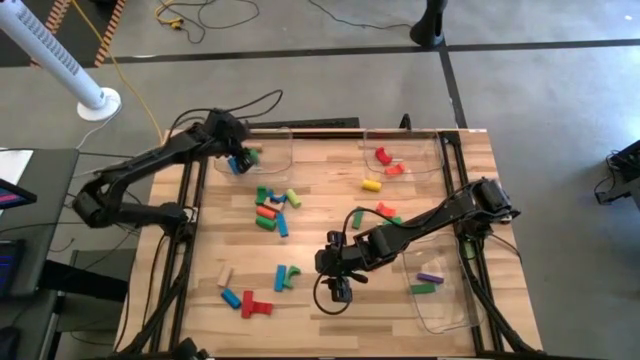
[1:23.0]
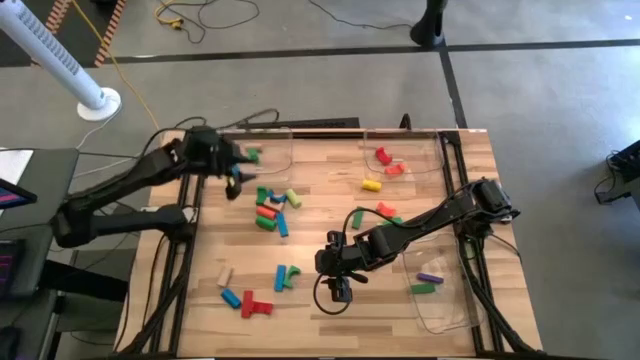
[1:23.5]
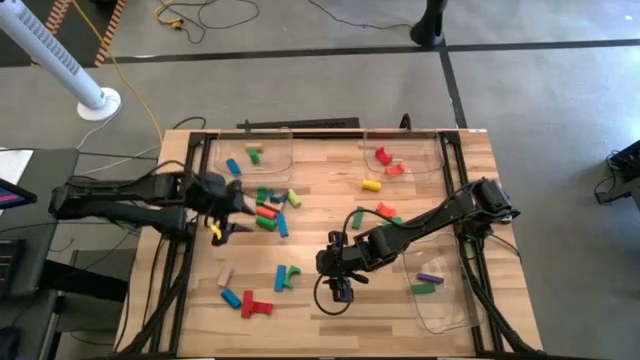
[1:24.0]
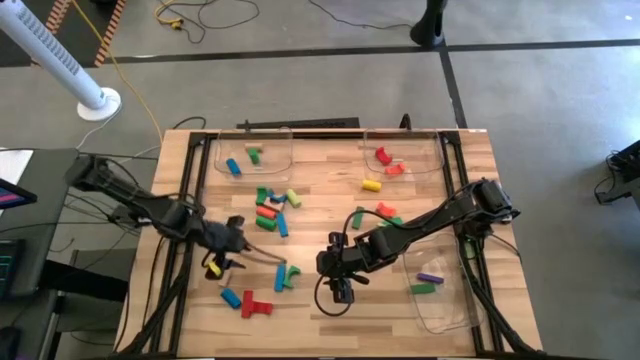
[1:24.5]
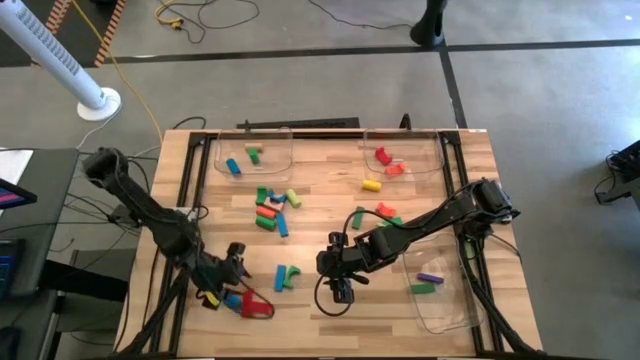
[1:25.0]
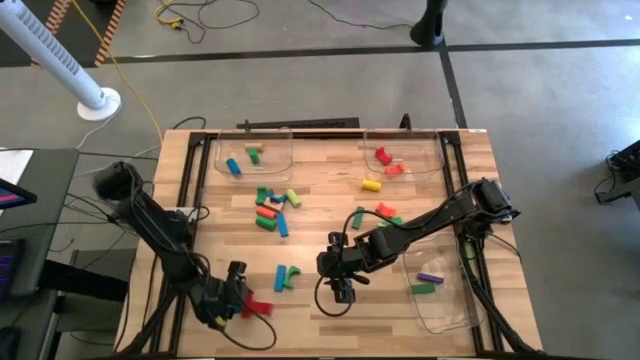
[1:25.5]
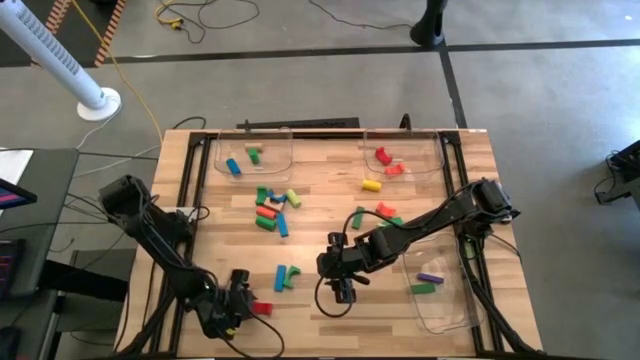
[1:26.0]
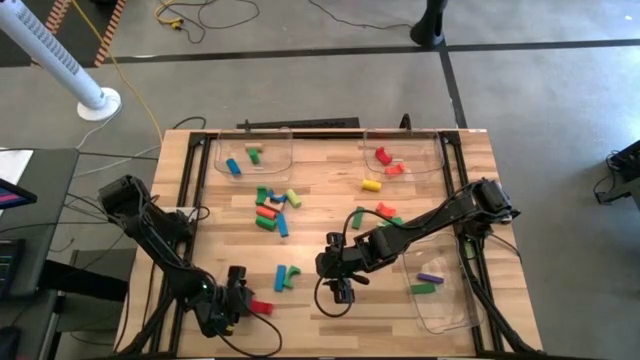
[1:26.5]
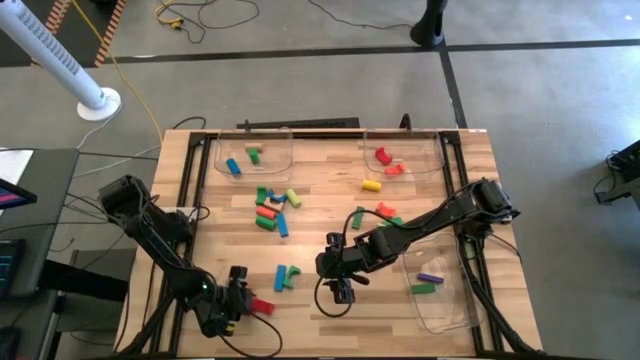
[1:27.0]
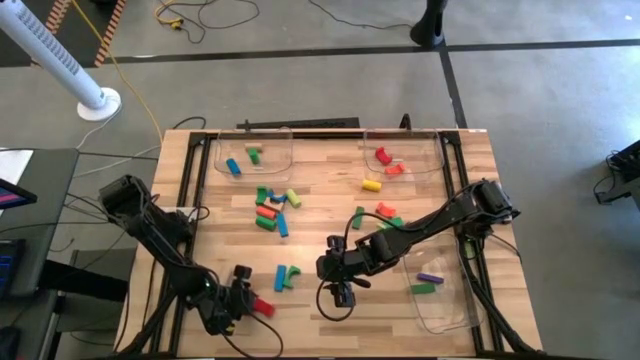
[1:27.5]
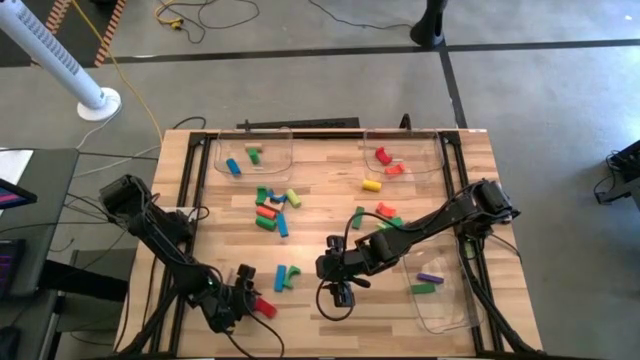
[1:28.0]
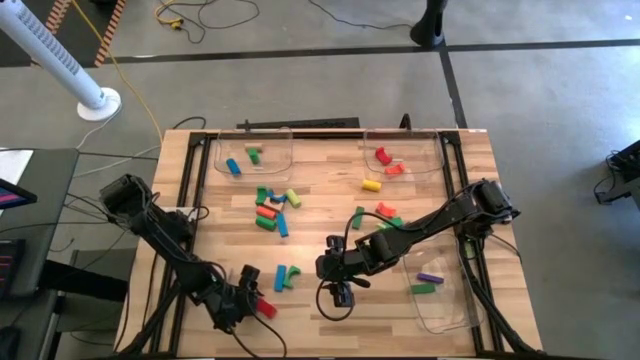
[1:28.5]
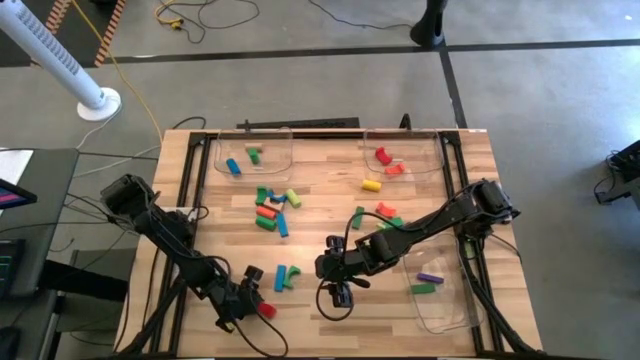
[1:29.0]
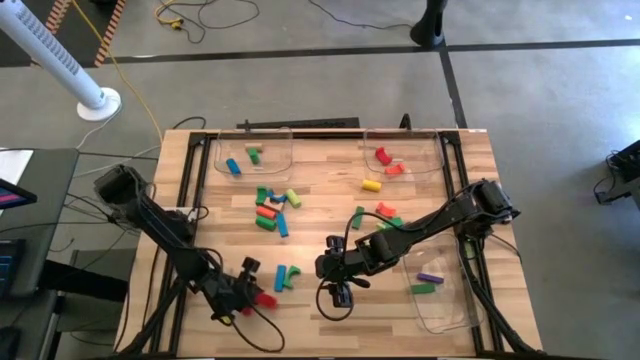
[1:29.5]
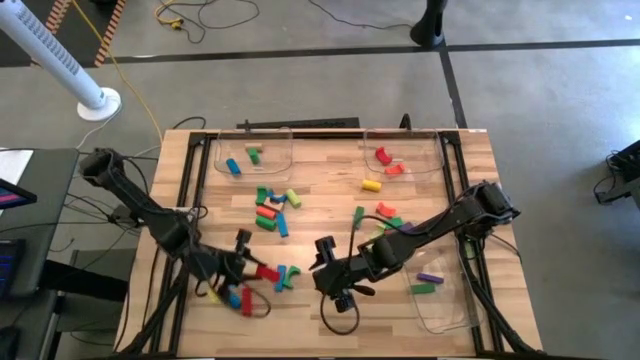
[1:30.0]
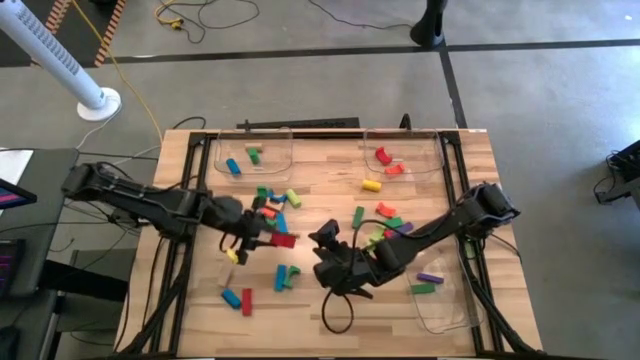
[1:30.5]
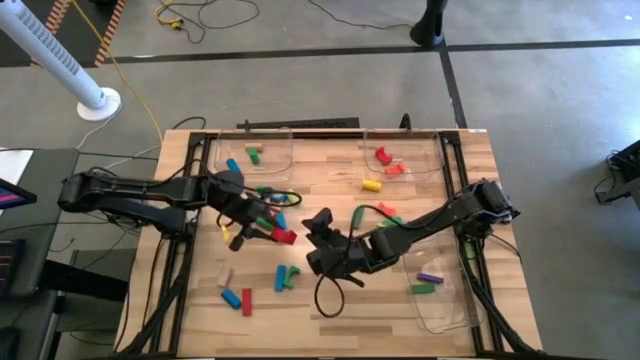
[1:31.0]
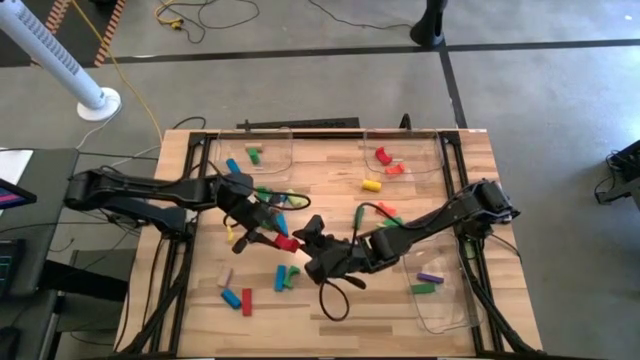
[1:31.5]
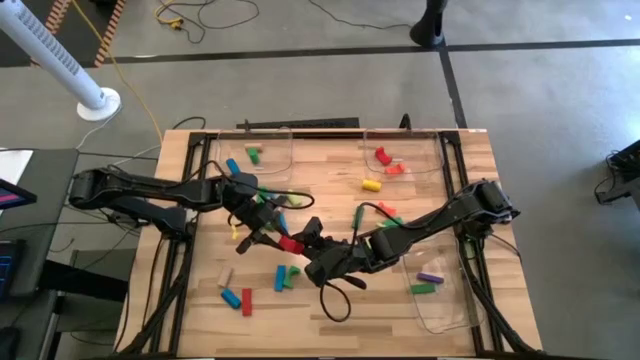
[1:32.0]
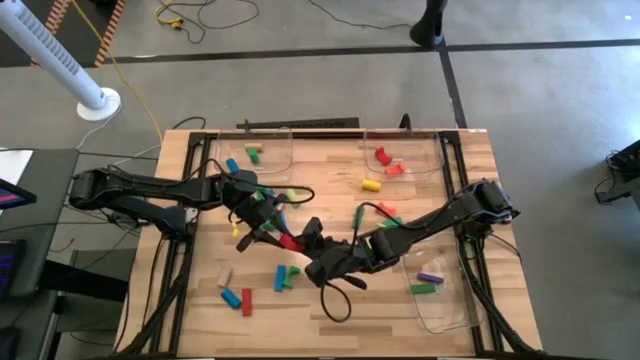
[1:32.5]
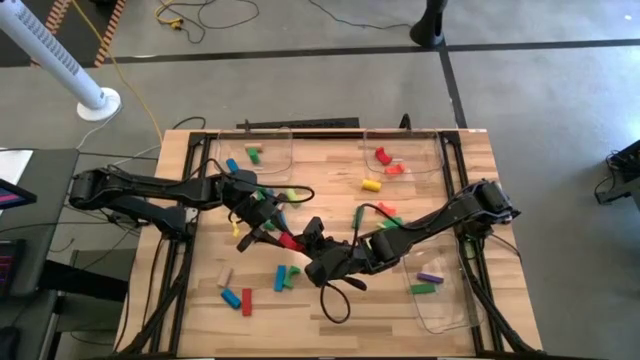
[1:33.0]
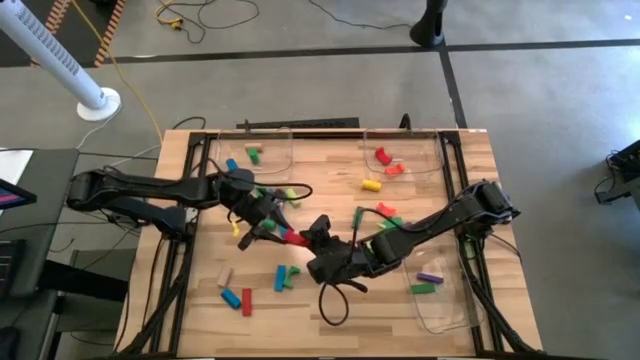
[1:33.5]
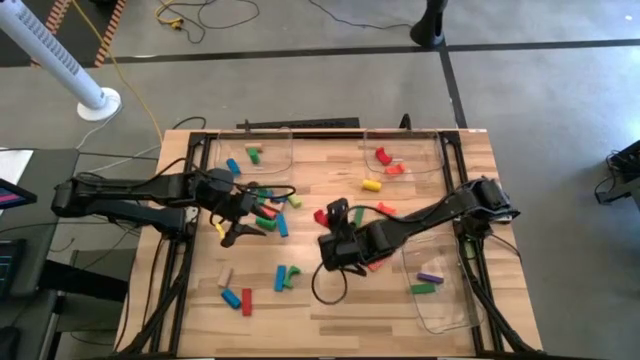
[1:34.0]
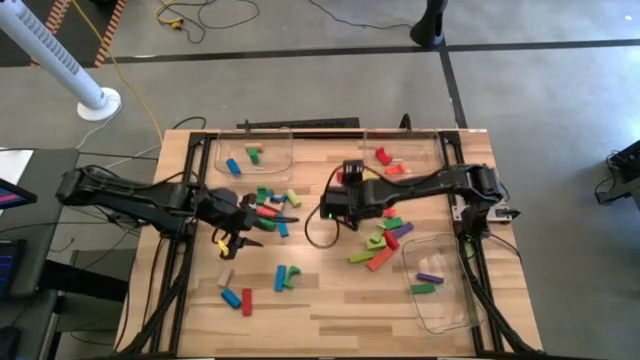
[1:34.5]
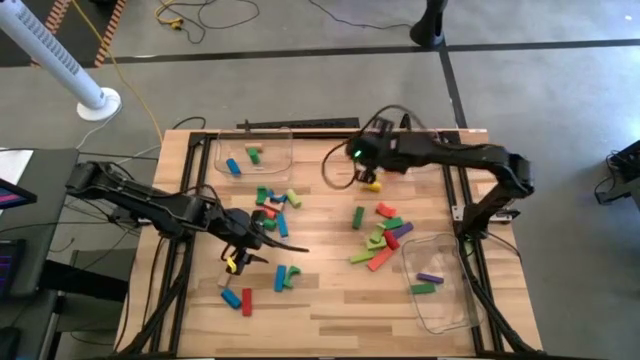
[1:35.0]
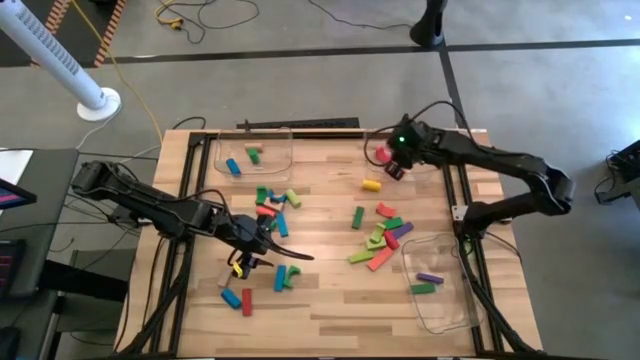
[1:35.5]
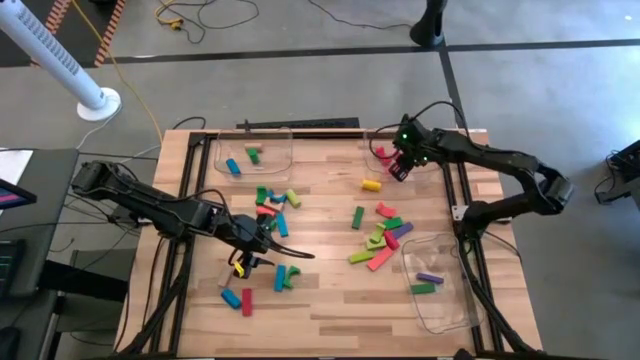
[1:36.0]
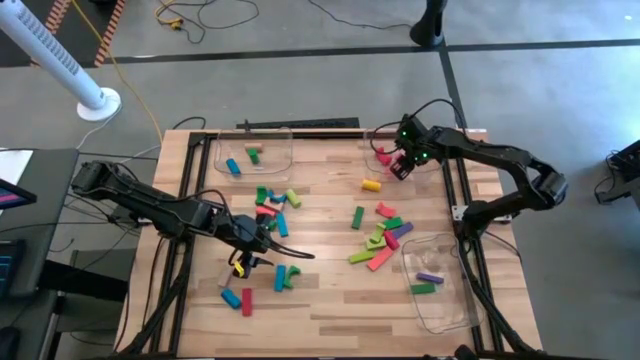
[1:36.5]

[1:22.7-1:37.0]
Task: Sort blocks by size
Put the red arch block into the top right transparent bin

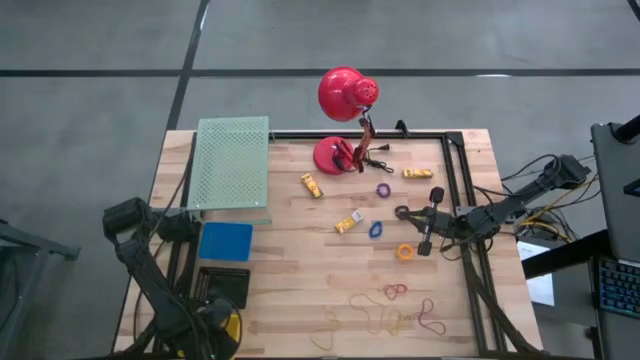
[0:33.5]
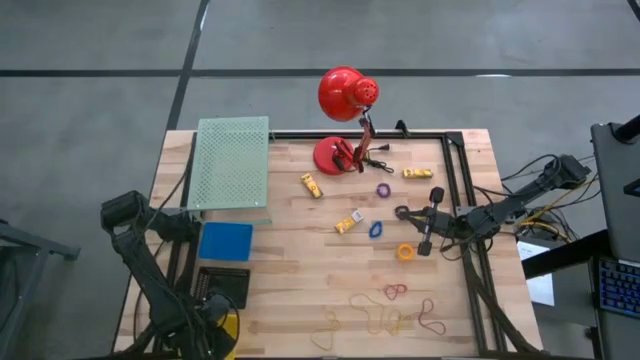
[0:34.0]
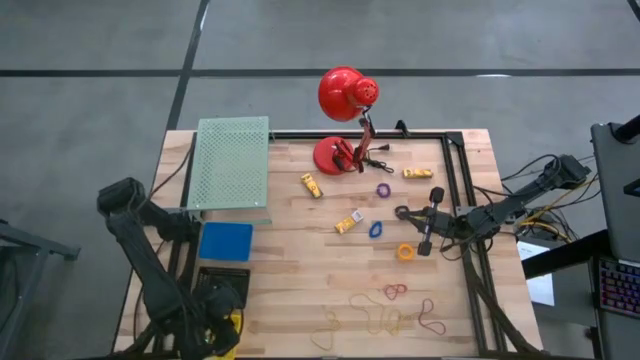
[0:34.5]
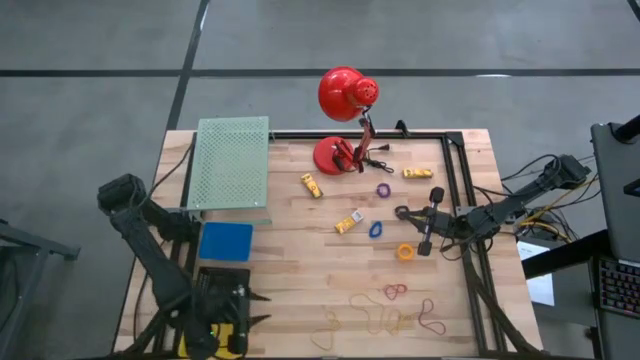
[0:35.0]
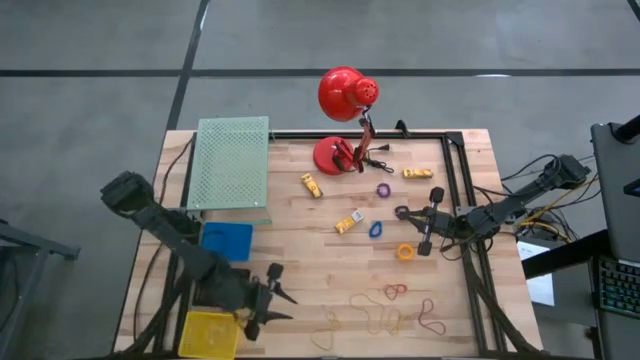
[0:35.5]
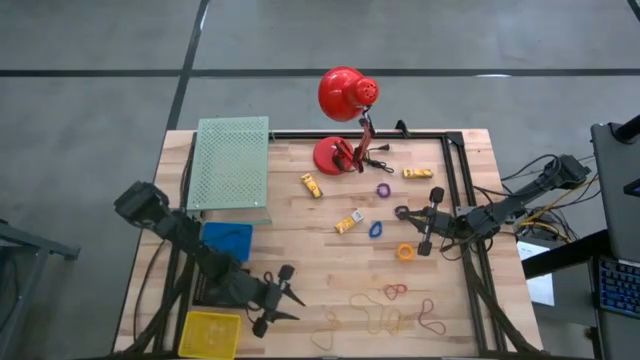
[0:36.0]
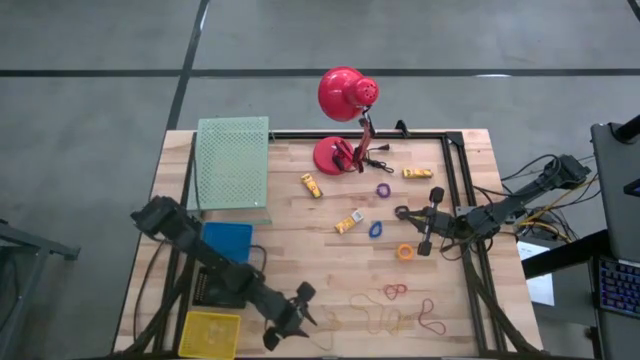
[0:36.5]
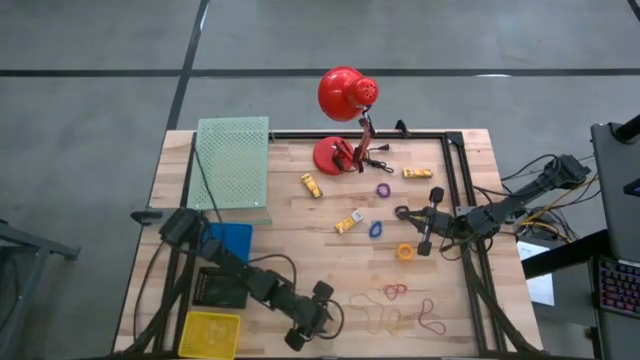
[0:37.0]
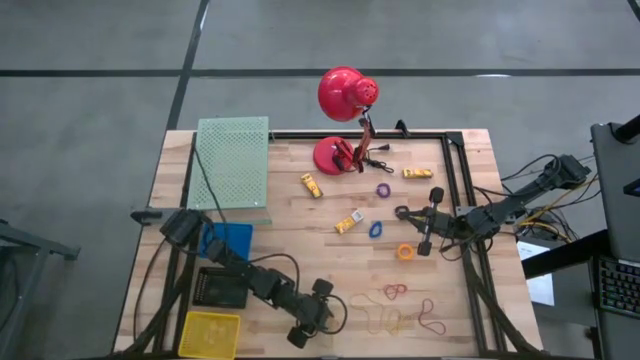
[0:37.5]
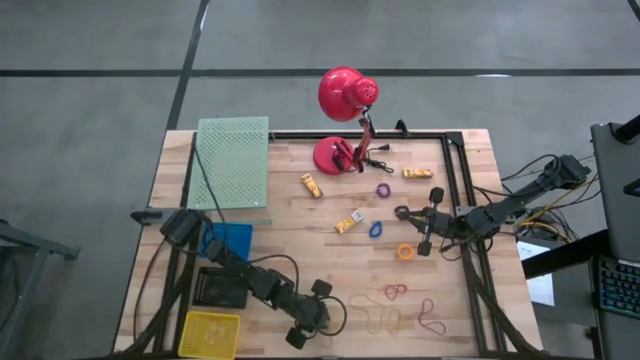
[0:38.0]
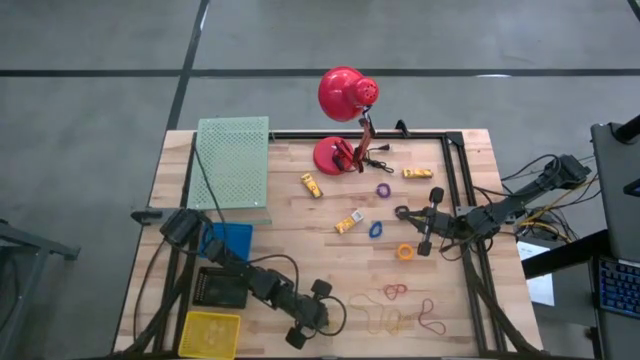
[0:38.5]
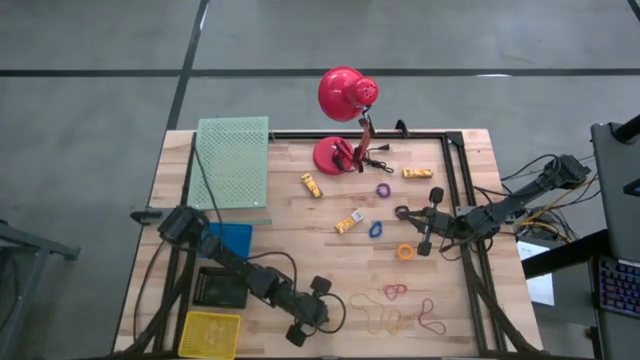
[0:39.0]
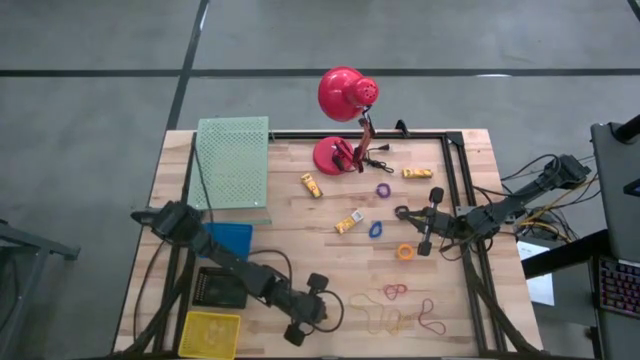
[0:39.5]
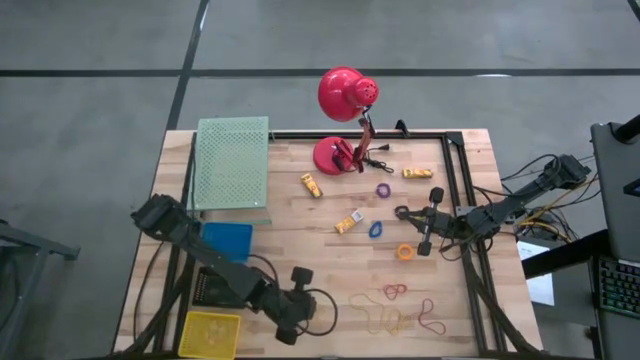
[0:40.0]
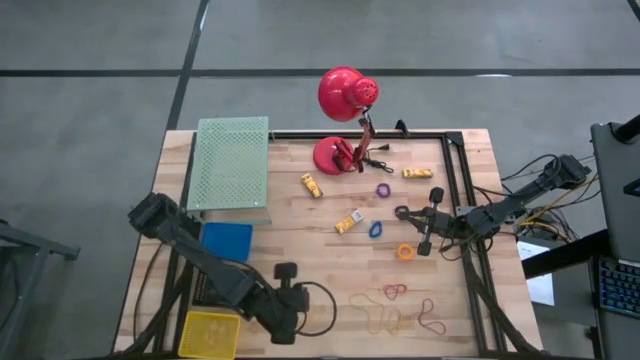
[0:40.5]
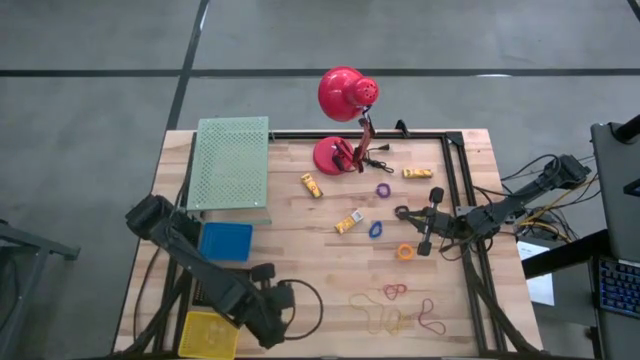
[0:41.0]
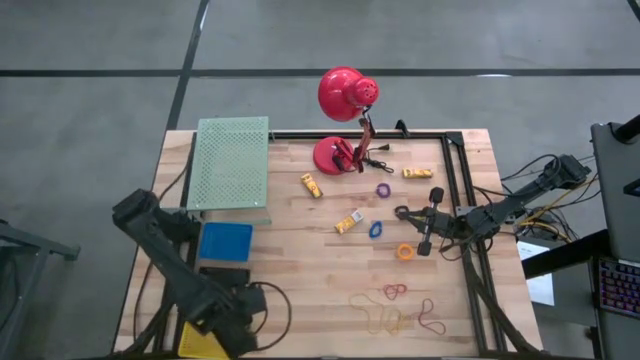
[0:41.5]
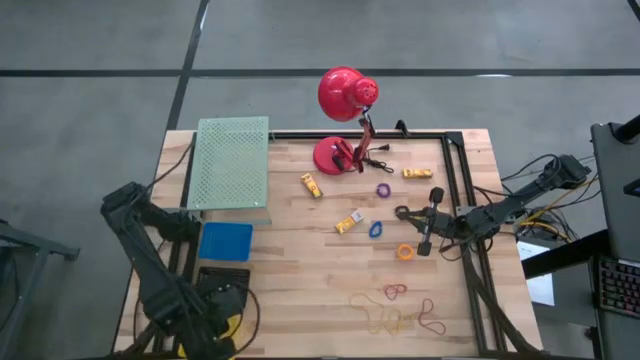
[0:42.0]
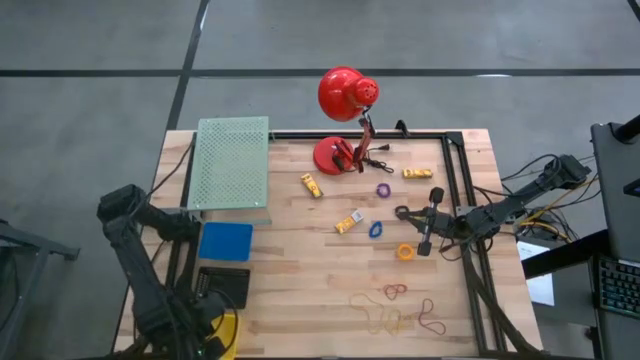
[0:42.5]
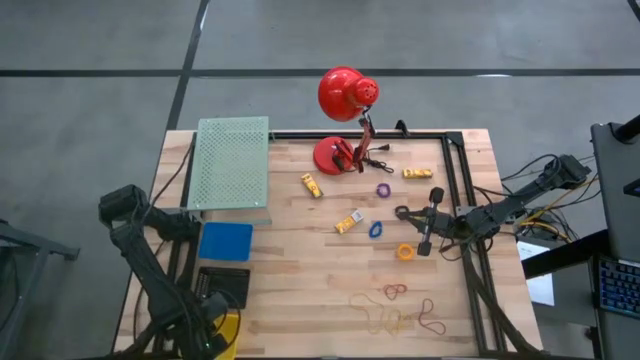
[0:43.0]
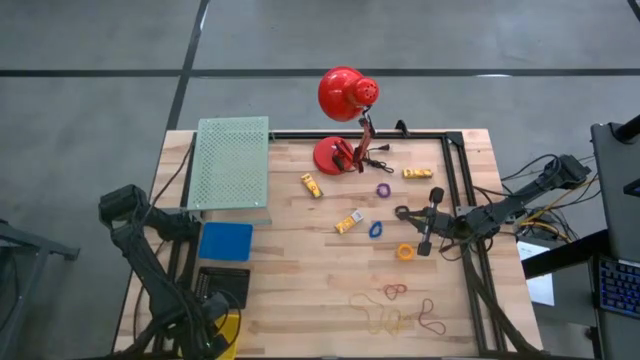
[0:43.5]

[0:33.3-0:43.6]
Task: Pick & Place Office Desk Supplies
Put the yellow rubber band into the yellow bin
